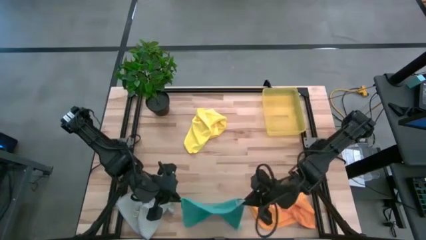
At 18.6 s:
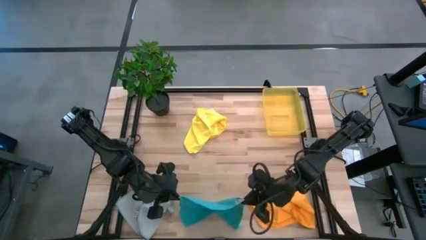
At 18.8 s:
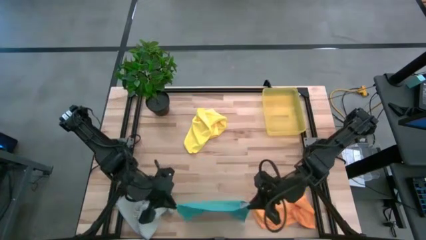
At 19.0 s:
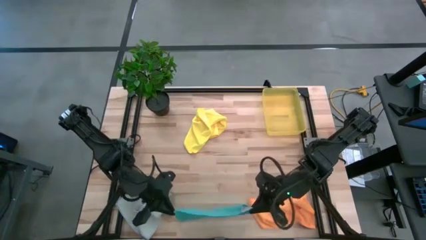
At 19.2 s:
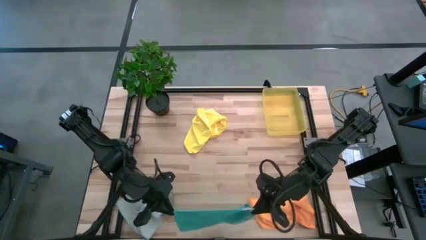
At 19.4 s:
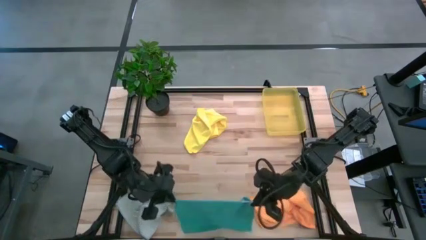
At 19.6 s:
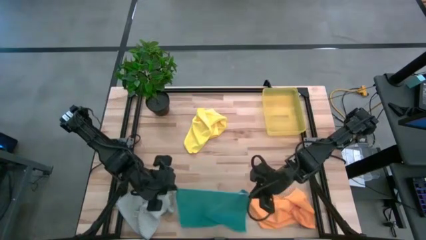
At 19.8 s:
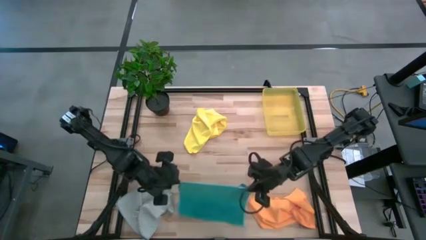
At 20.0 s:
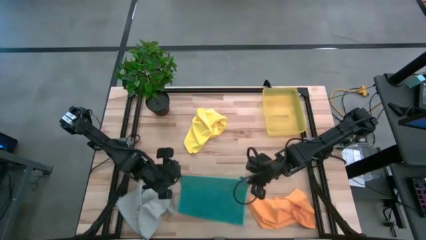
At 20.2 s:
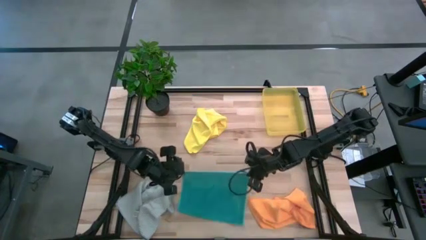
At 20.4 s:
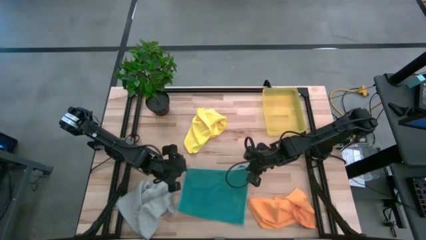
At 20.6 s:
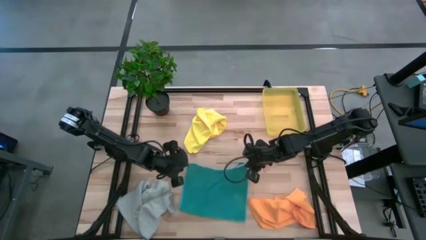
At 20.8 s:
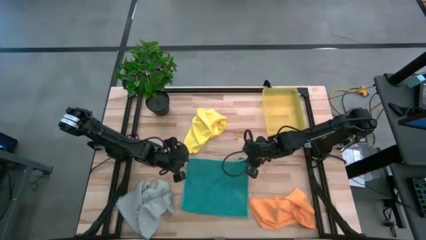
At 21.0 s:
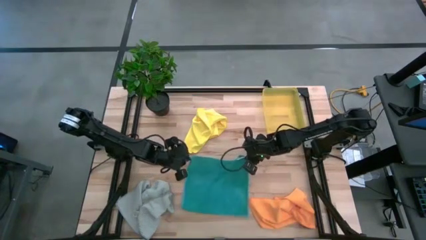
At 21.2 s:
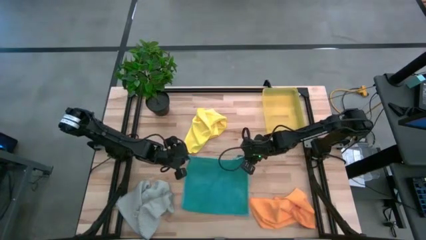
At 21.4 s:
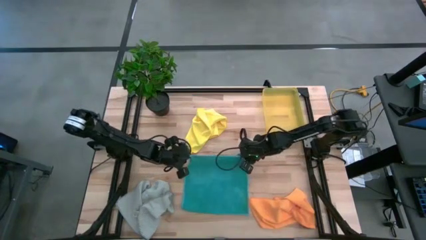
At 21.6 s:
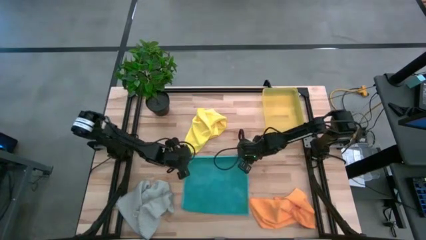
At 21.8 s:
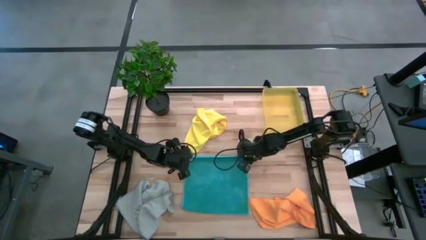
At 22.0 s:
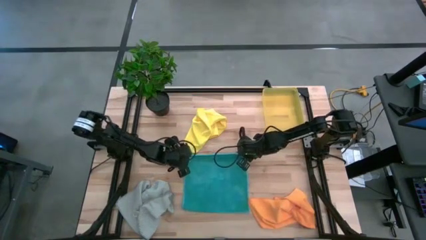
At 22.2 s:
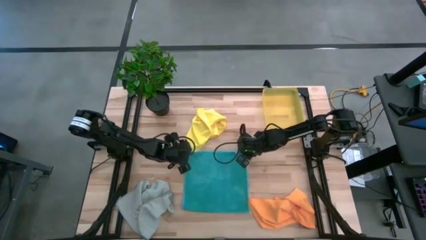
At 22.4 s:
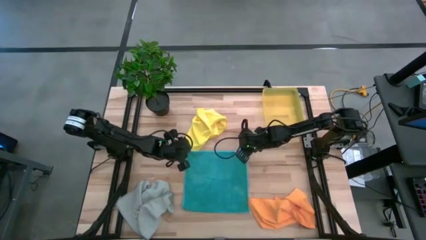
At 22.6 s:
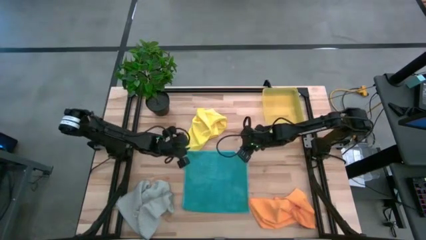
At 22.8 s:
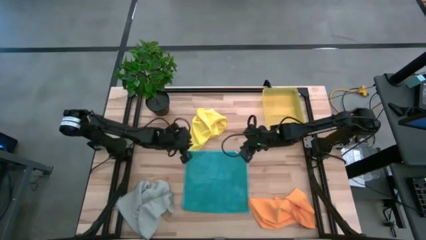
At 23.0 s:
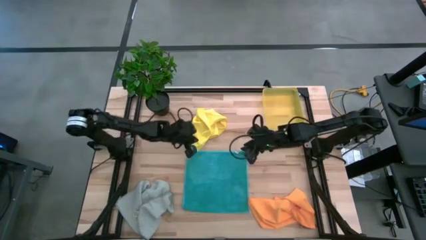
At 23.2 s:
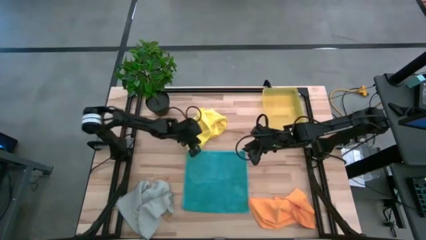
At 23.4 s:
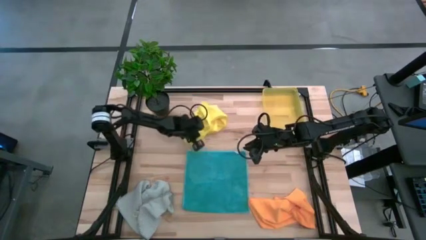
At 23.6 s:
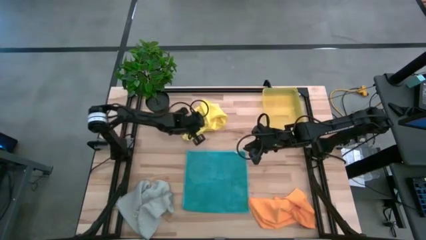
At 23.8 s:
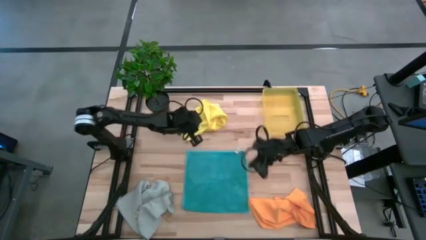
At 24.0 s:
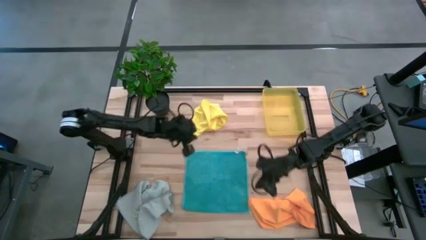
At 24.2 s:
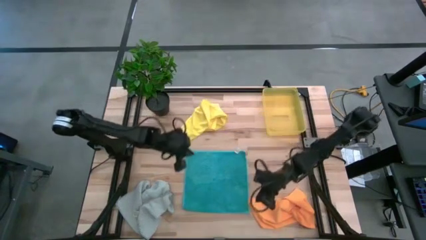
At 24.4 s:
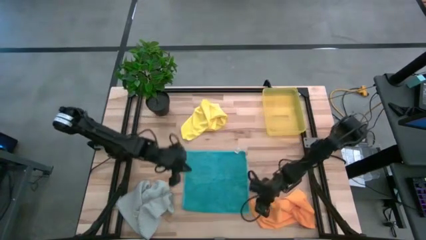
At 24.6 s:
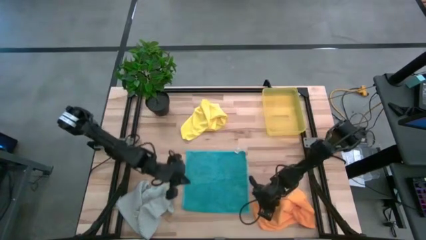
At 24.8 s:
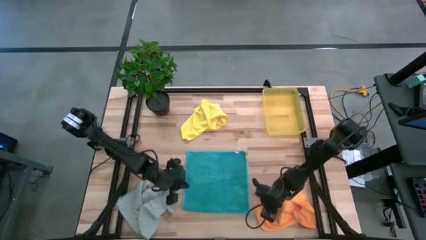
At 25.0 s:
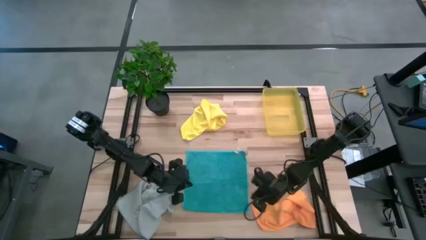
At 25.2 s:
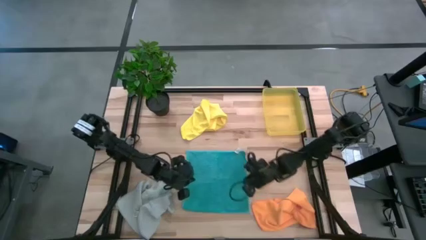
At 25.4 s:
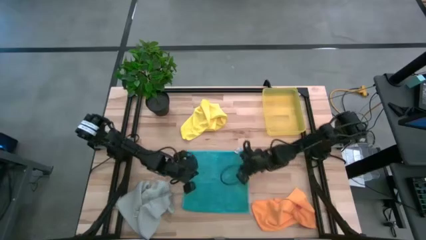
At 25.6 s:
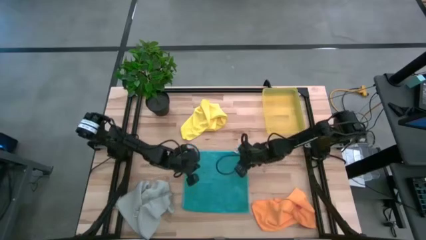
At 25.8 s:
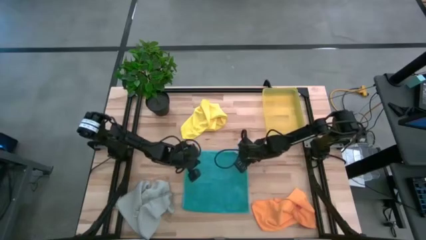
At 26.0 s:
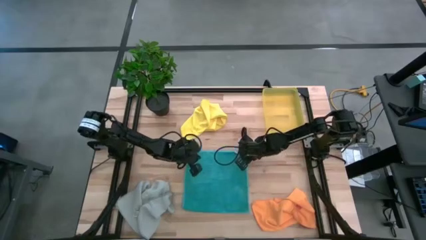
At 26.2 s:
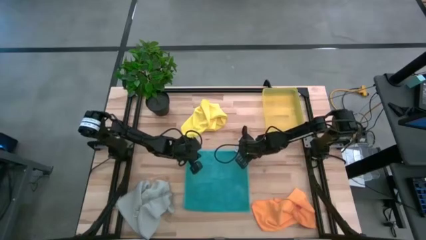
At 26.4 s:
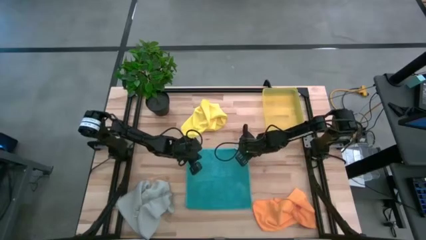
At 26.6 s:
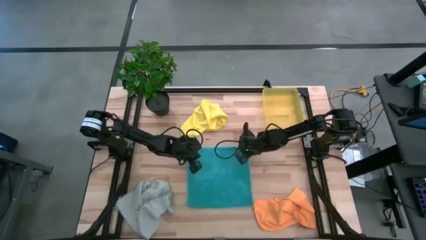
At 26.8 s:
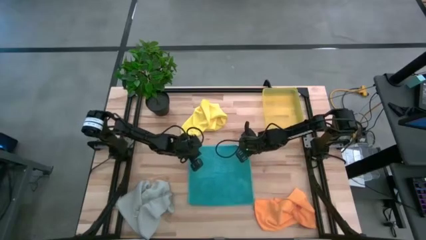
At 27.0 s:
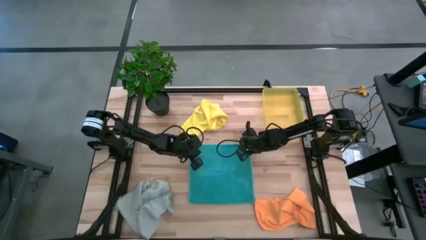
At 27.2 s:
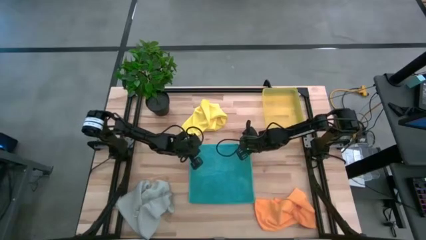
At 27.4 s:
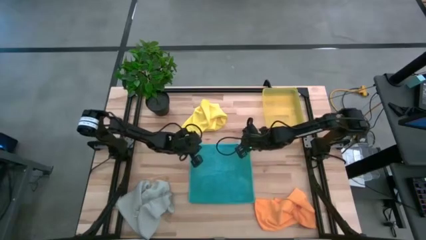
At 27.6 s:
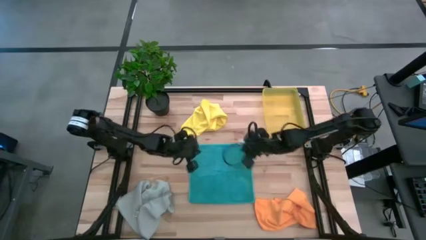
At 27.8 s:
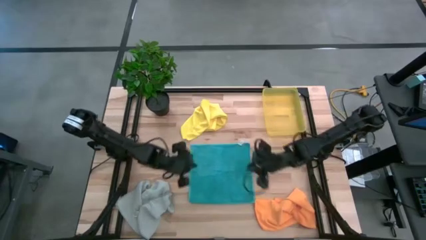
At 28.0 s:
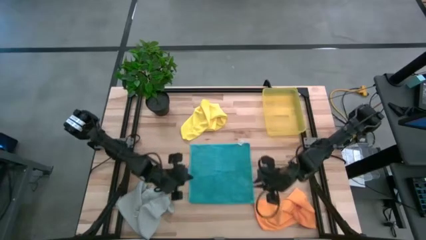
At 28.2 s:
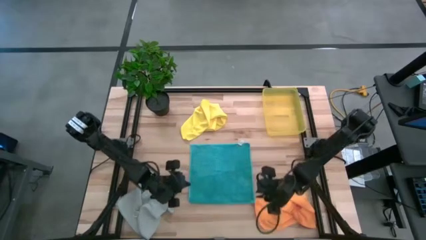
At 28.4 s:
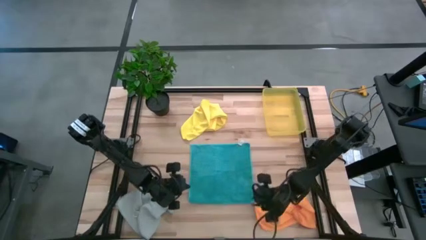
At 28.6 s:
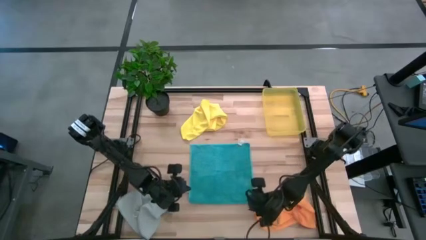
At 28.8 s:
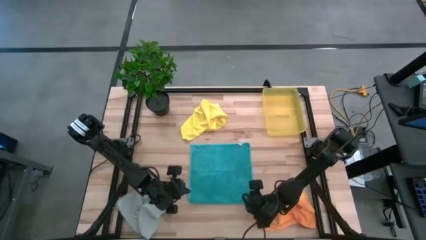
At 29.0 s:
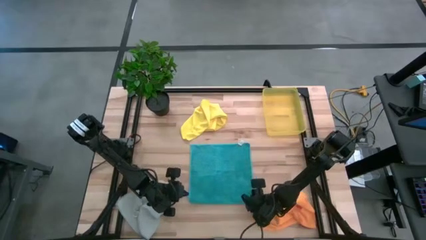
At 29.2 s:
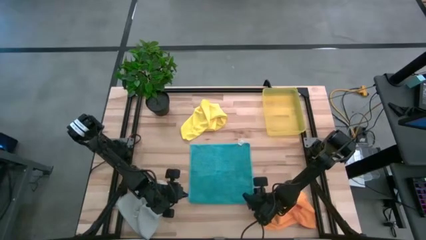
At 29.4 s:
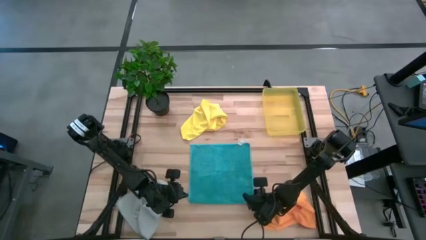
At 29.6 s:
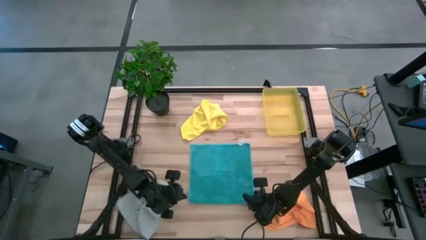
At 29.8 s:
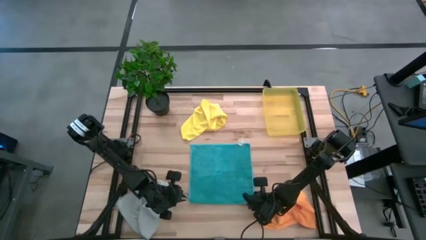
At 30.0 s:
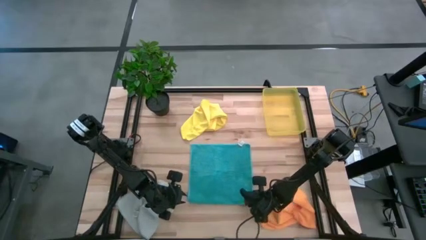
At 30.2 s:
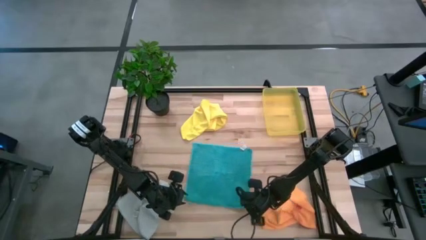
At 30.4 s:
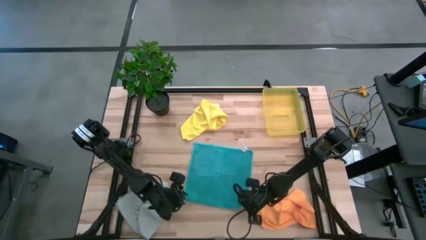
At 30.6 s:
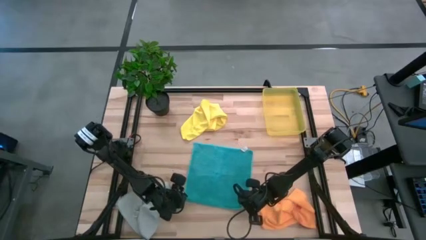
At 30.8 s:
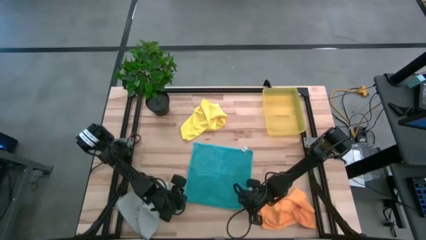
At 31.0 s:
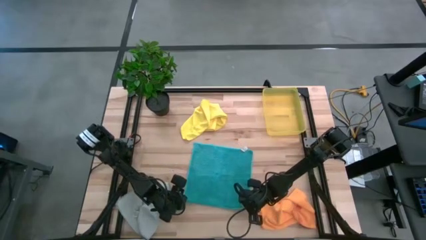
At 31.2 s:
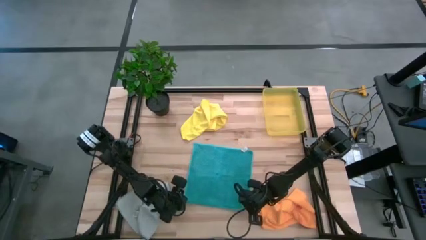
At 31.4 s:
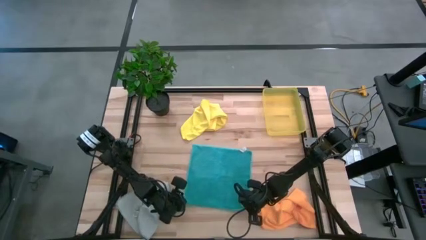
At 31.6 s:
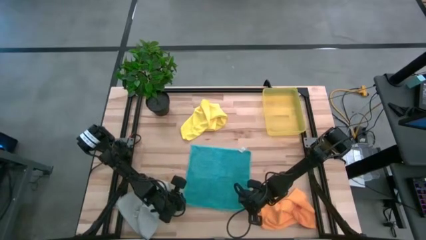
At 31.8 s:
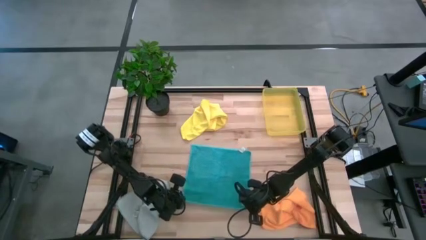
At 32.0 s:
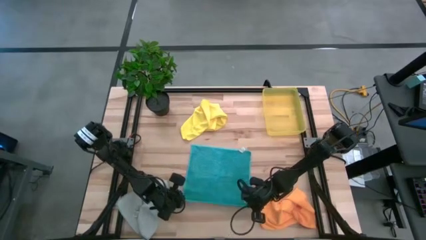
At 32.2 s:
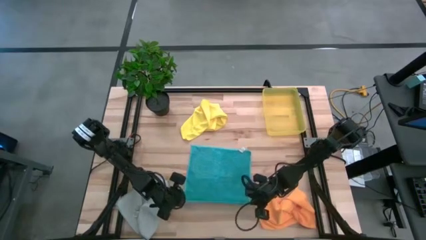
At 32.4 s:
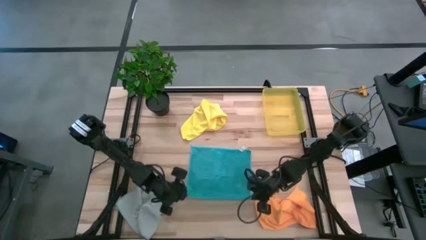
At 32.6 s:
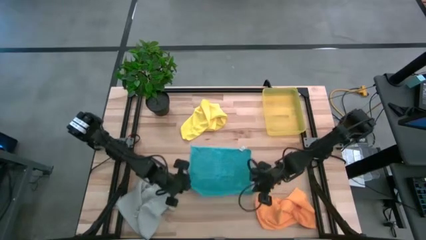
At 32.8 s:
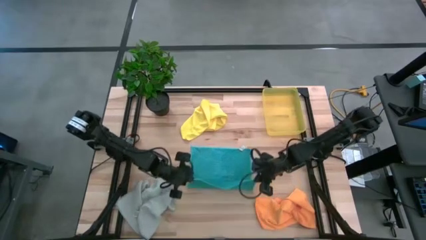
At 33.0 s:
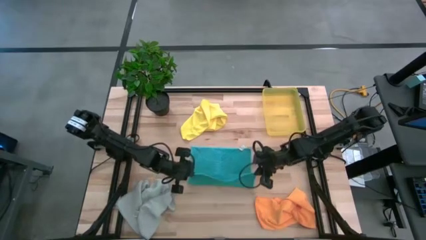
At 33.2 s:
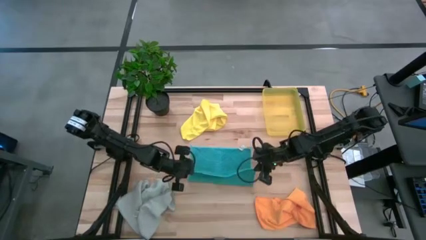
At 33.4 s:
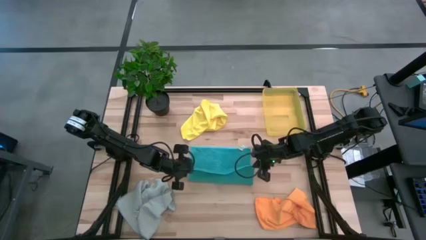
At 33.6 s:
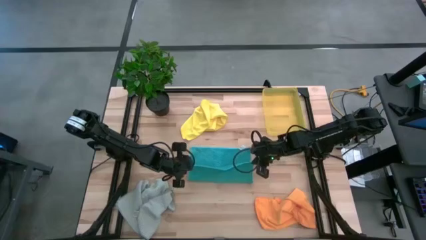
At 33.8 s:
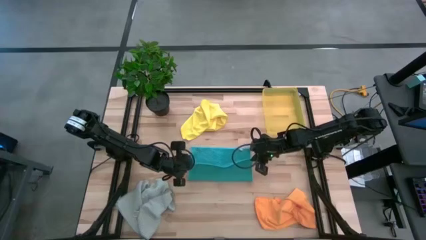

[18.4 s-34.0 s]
Task: Fold microfiber towels
Fold the blue microfiber towel

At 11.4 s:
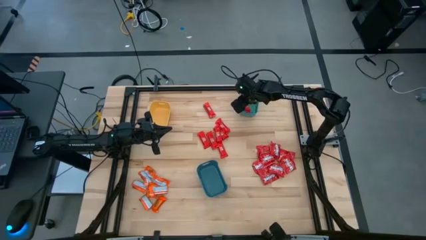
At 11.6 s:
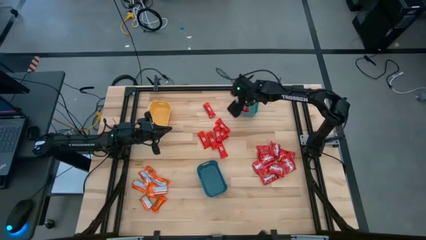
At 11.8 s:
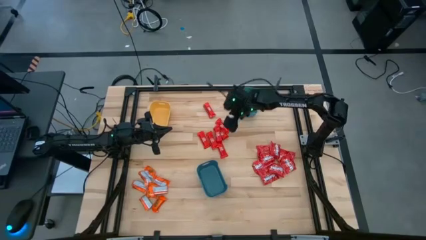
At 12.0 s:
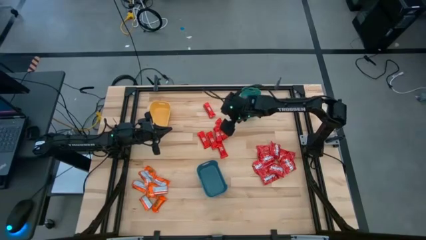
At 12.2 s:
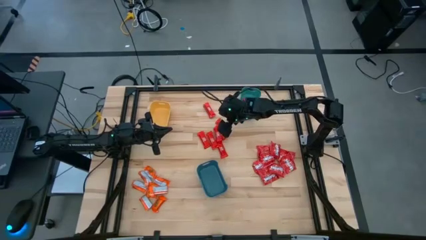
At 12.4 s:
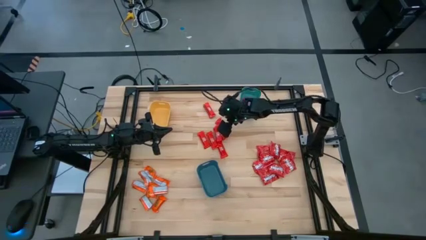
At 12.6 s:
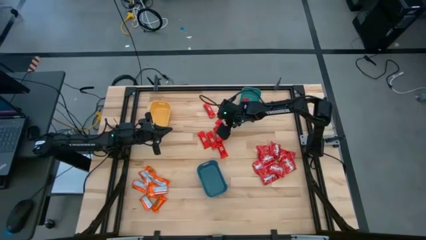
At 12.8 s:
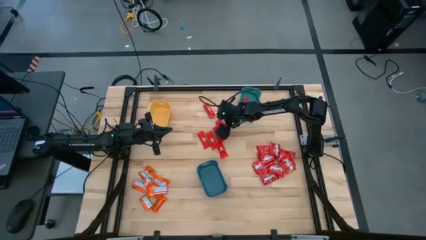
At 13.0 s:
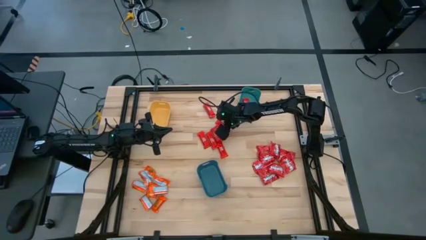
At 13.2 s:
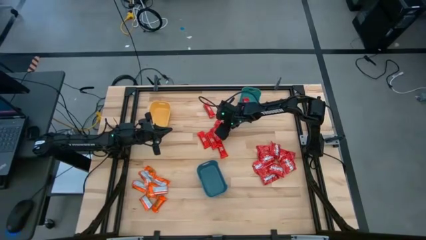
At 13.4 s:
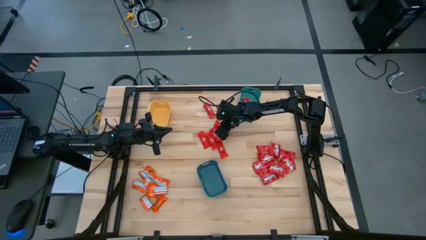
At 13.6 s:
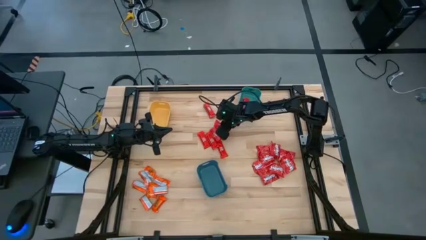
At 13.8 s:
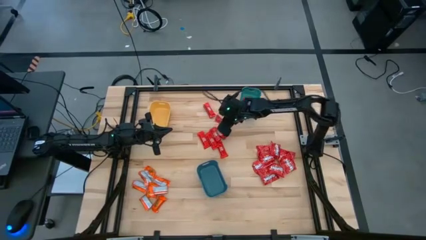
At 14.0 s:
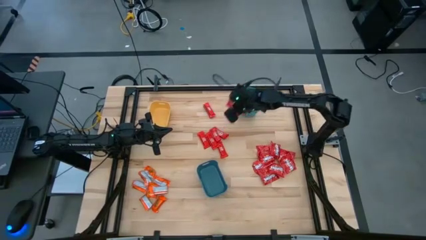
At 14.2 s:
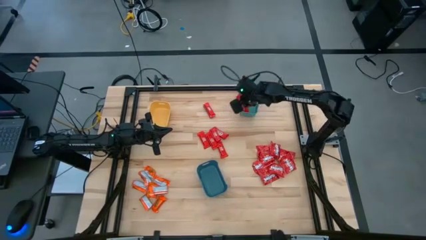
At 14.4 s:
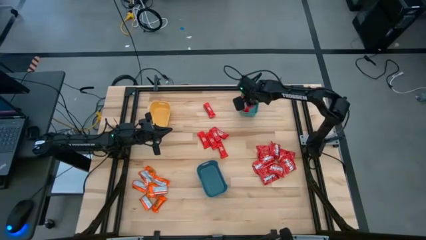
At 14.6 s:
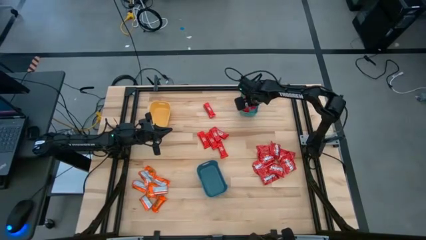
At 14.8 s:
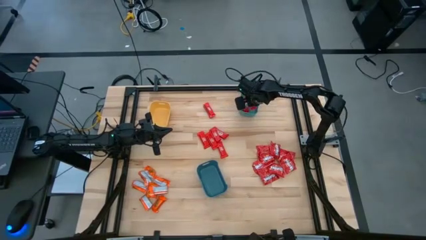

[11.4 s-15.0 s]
Task: Sort candy
Put the red chocolate bar into the green bin
